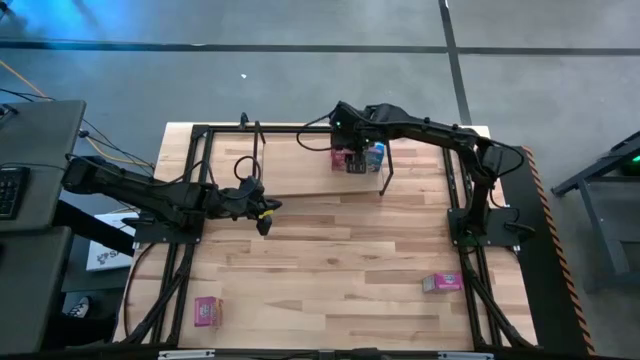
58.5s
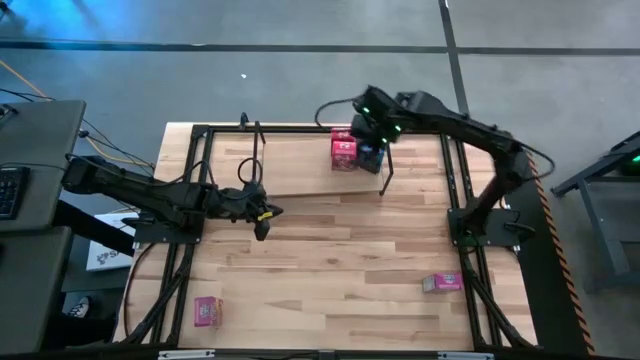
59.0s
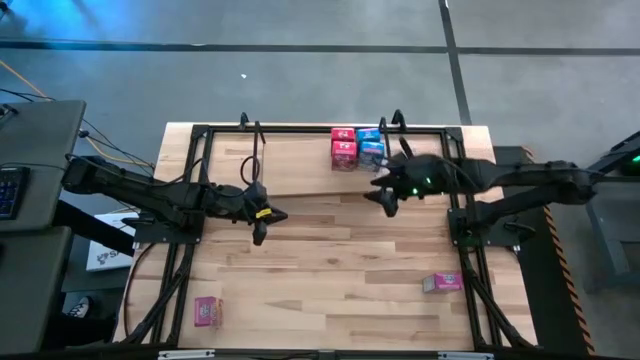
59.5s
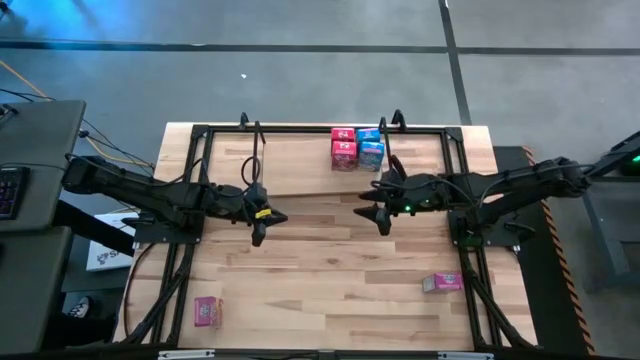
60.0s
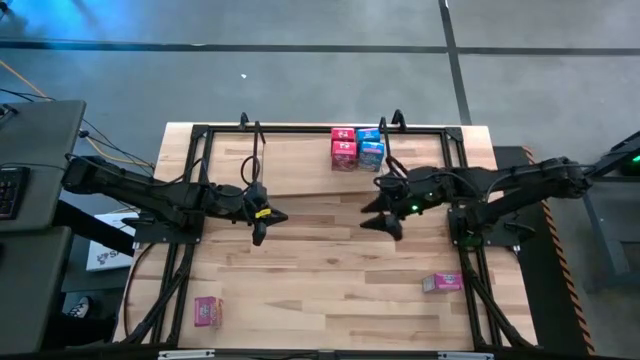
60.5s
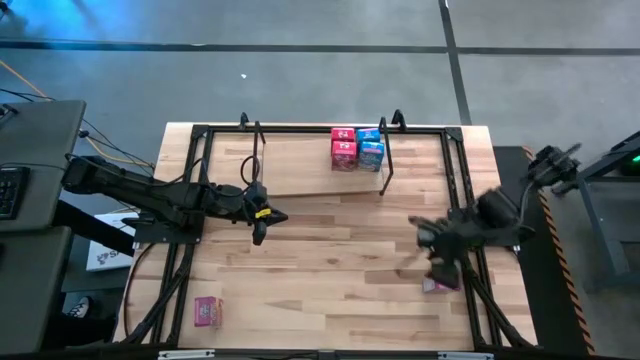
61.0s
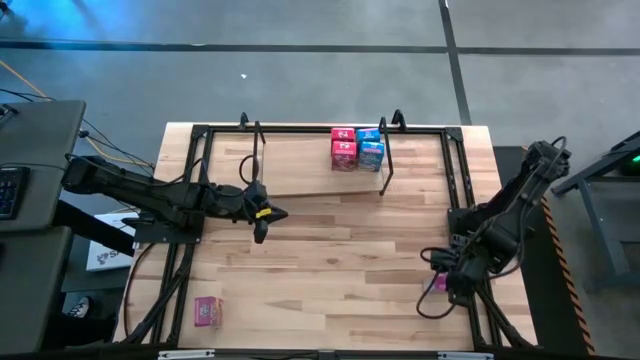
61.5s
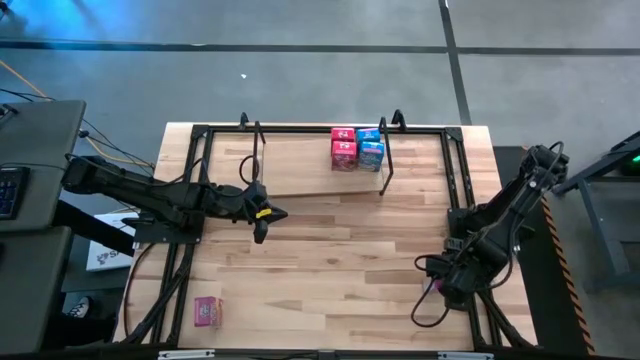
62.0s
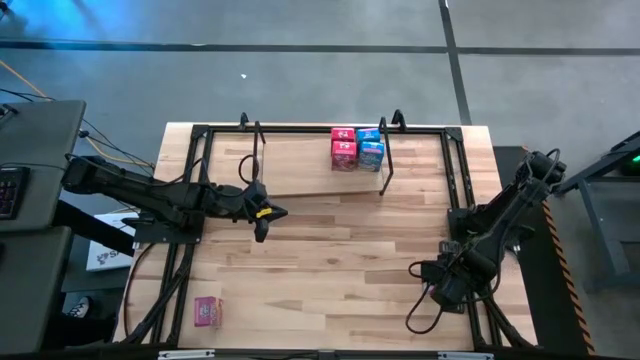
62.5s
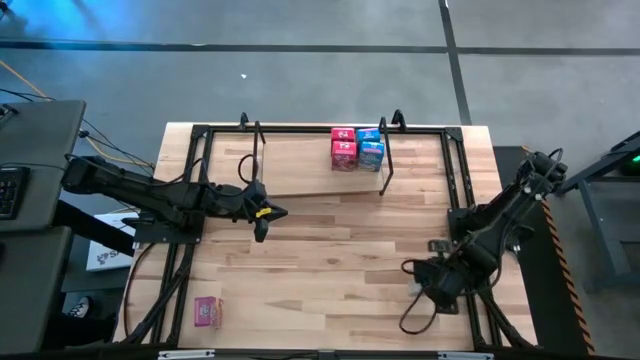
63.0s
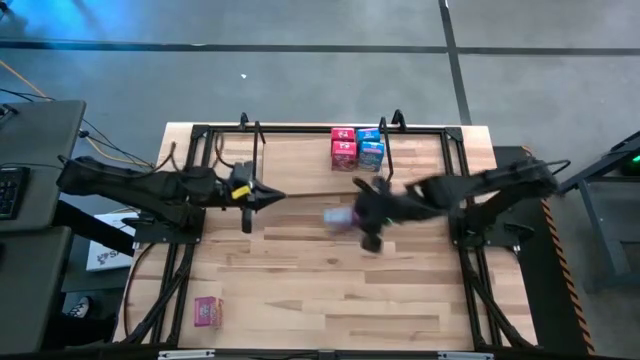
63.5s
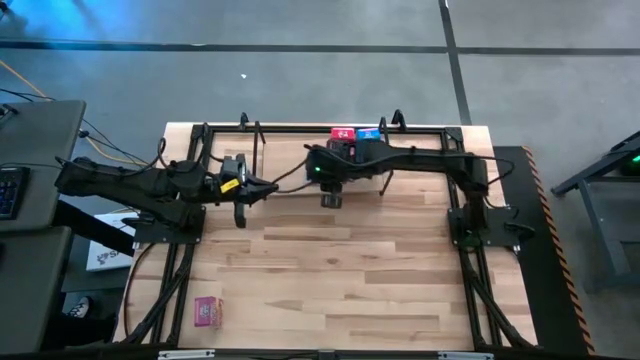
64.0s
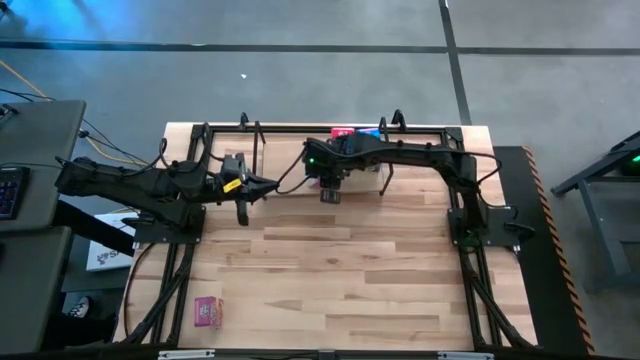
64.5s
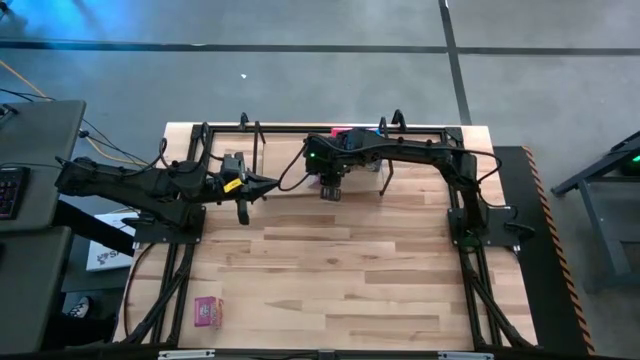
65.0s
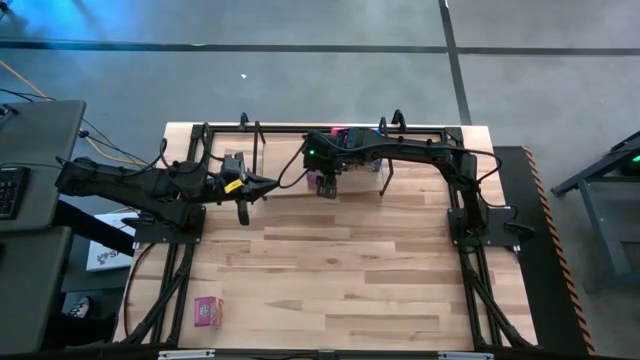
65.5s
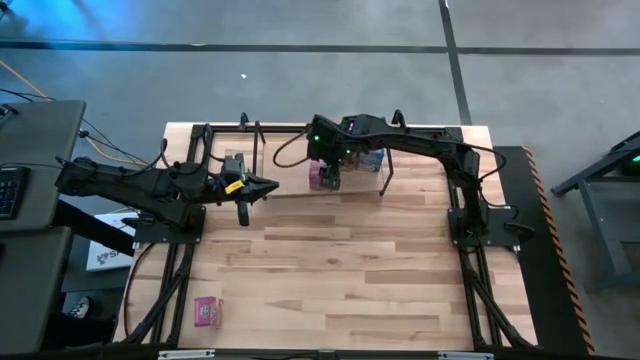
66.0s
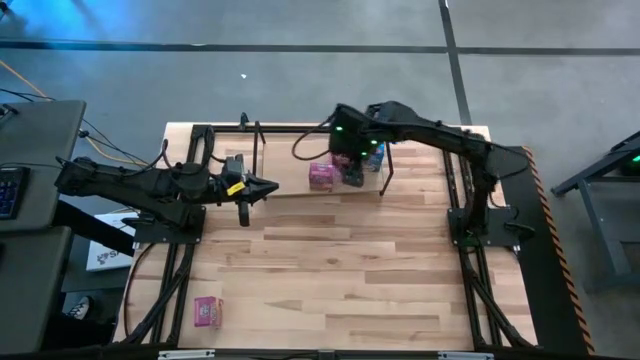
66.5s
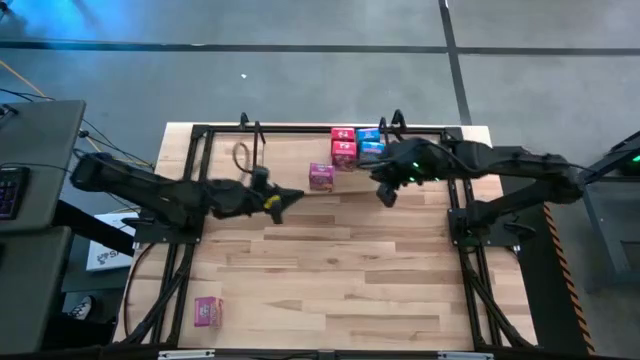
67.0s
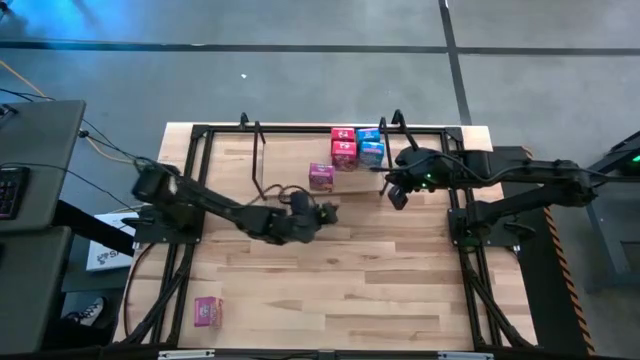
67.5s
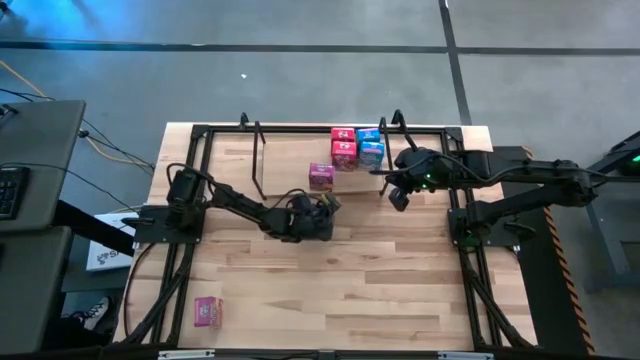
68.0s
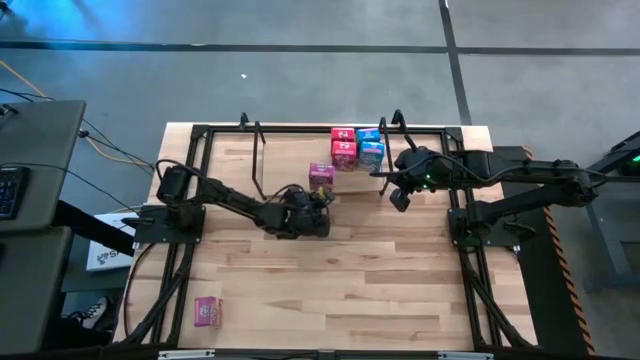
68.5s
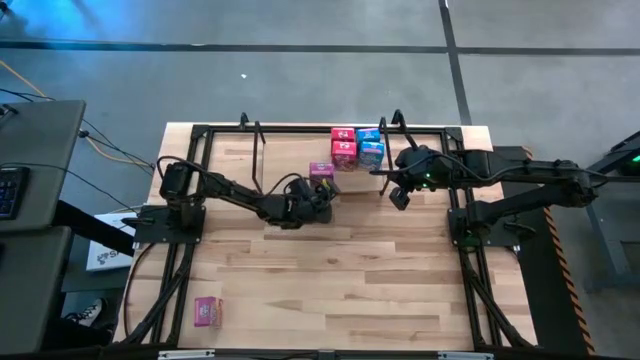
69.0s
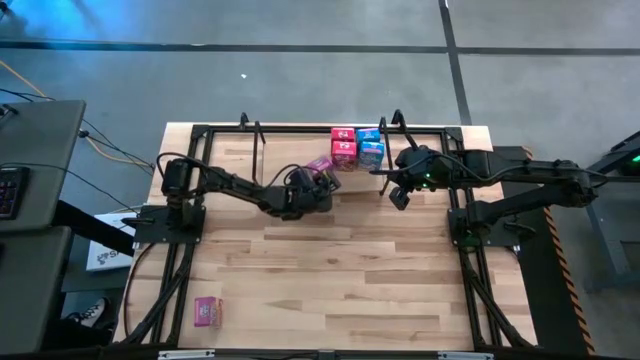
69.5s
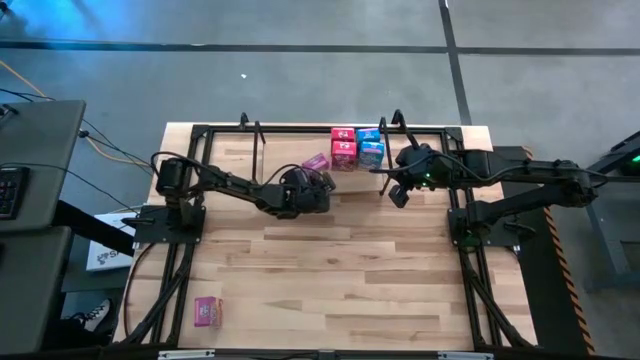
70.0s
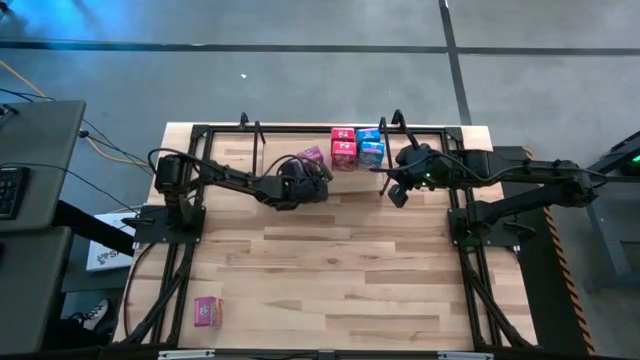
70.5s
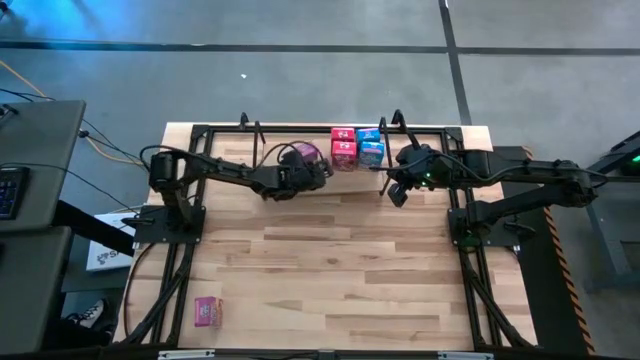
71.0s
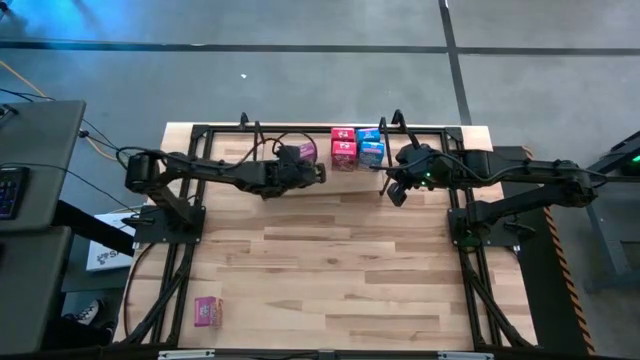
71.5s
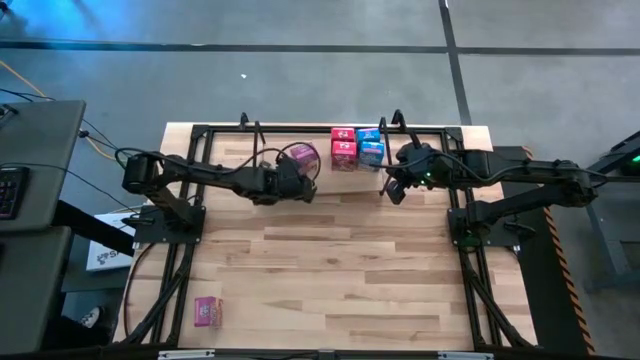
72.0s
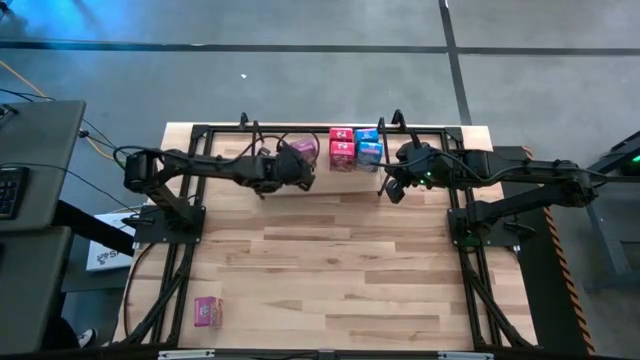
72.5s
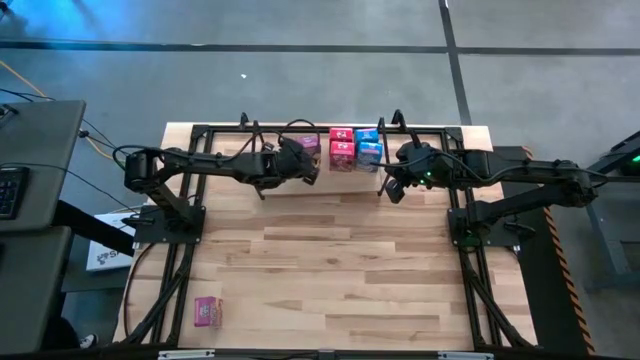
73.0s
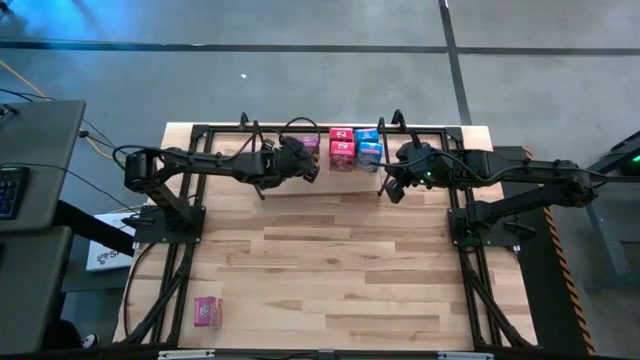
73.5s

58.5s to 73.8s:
Task: Stack cereal on shelf
Put the top violet cereal box on the shelf

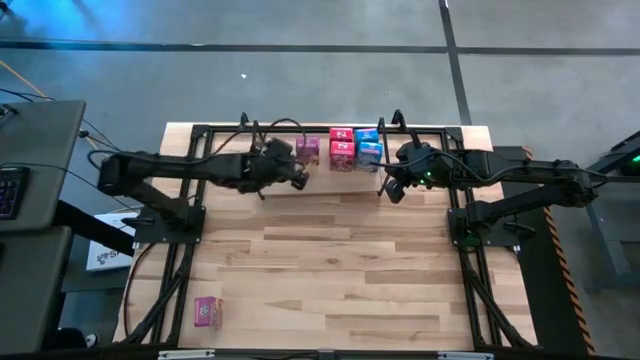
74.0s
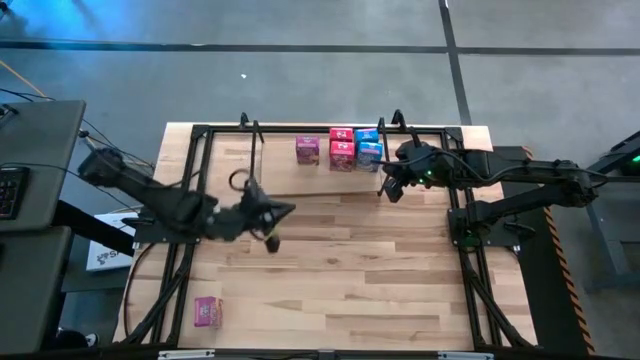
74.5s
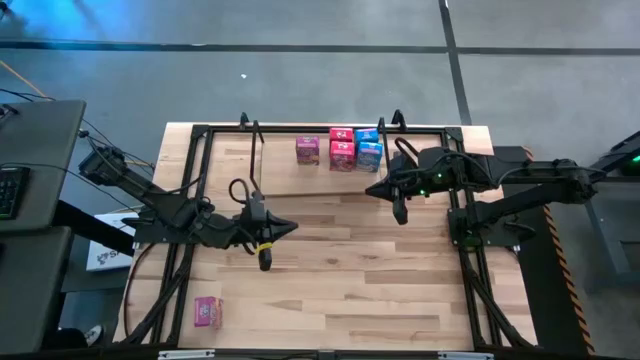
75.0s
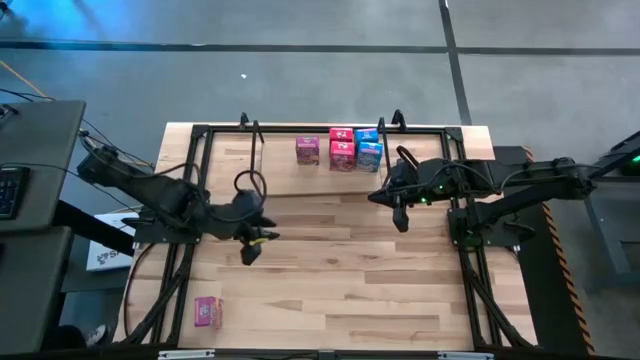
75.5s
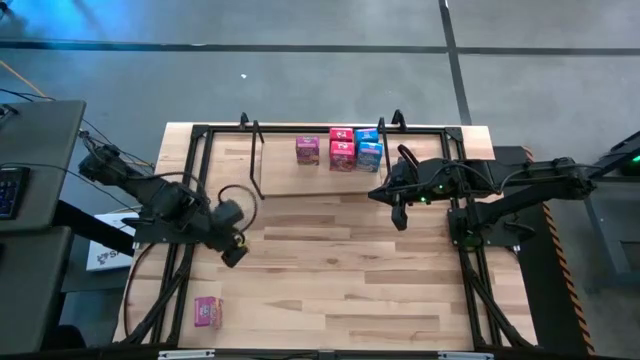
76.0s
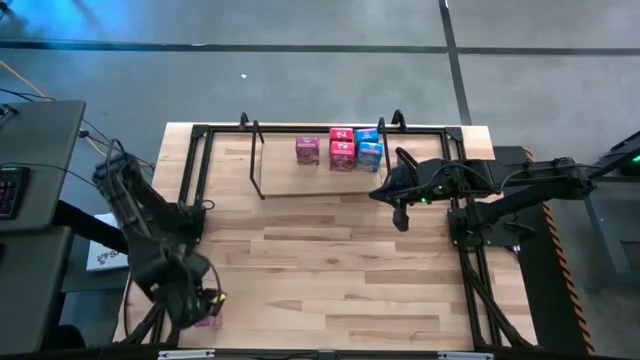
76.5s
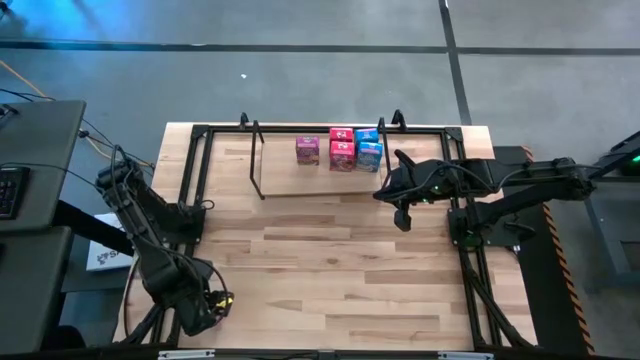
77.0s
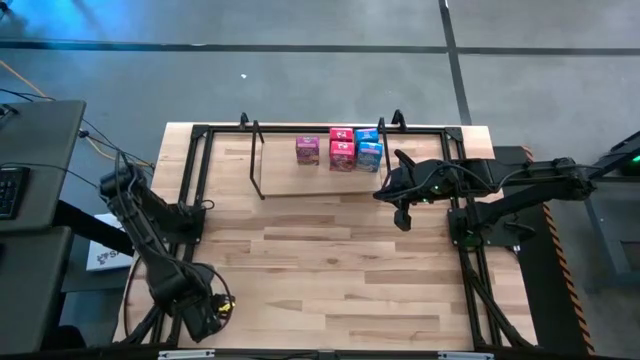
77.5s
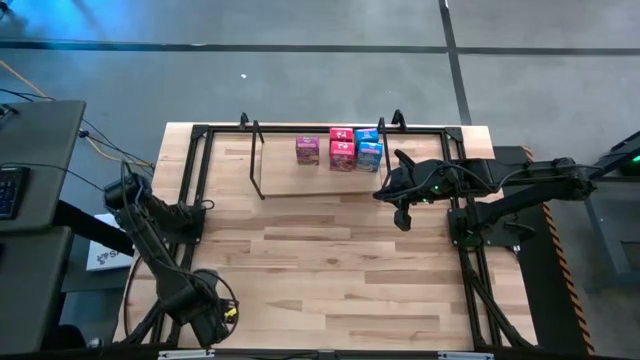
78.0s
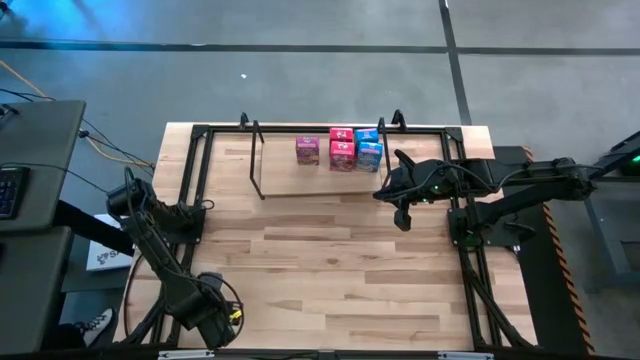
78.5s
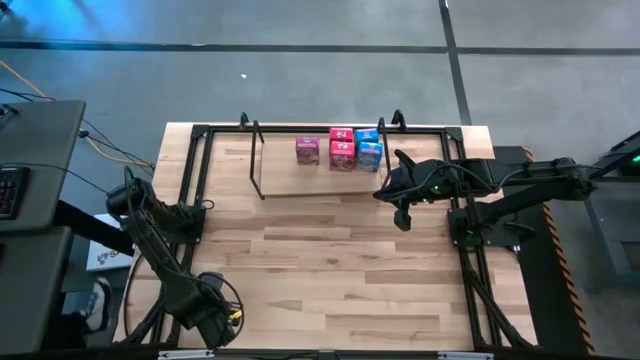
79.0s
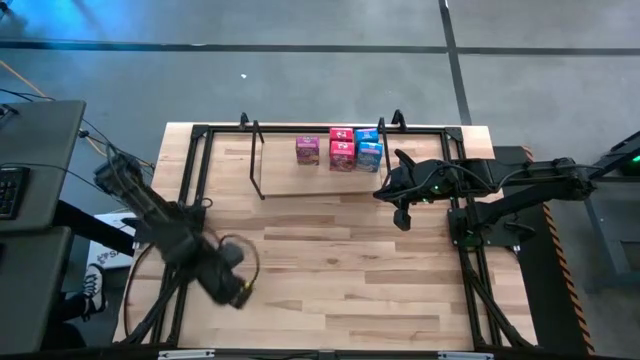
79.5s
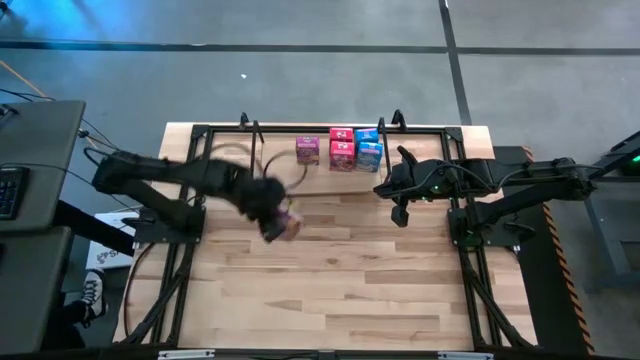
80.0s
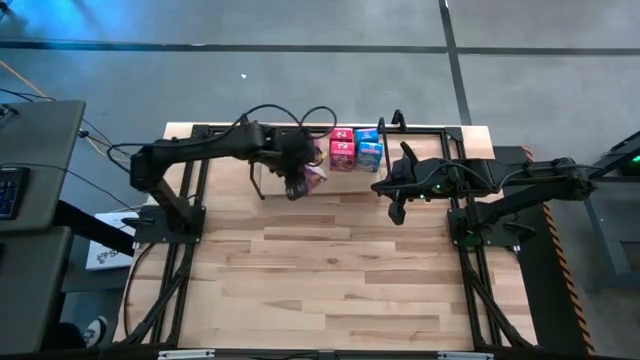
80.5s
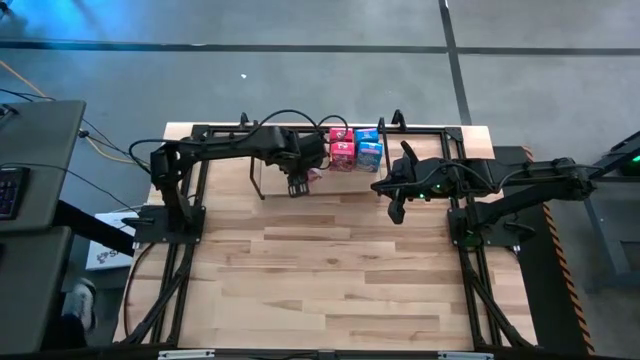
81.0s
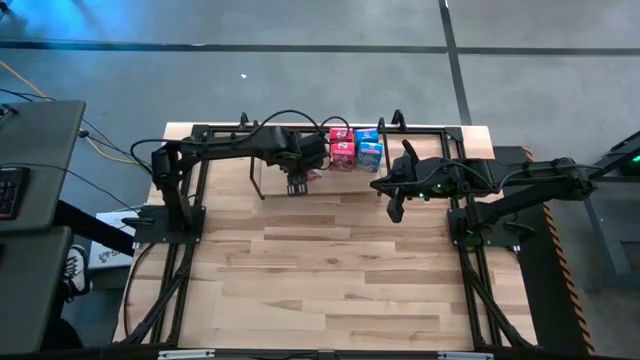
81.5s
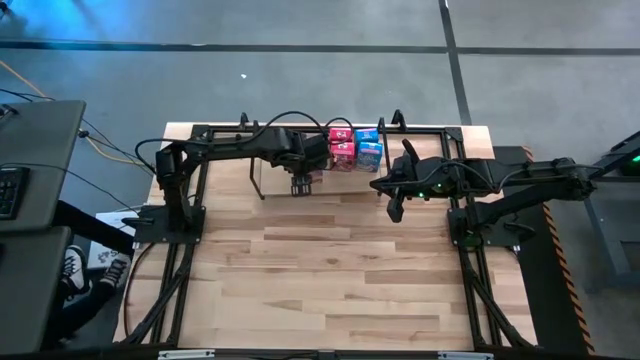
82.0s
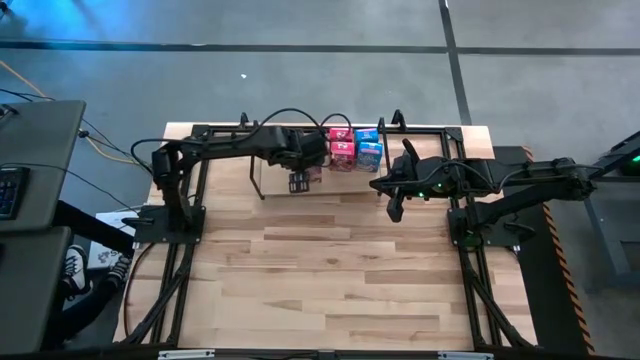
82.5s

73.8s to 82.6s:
Put the violet cereal box on the shelf aligned with the other violet cereal box
